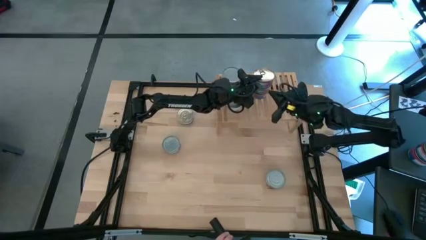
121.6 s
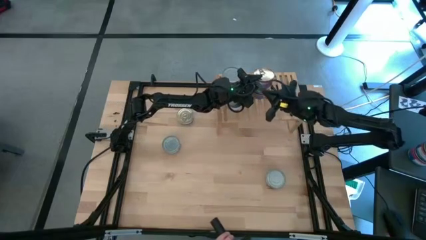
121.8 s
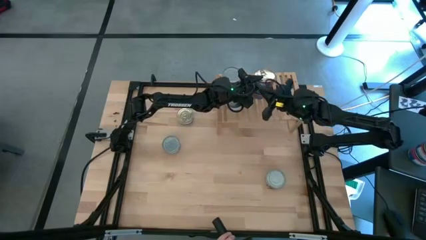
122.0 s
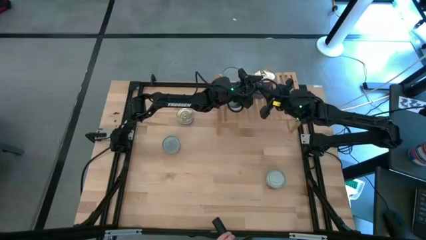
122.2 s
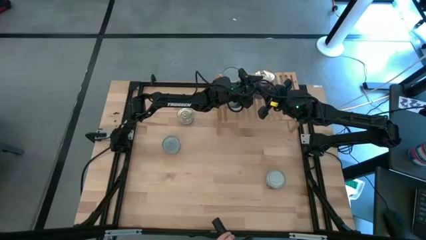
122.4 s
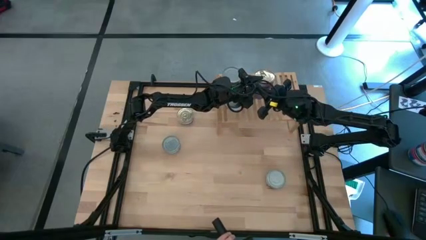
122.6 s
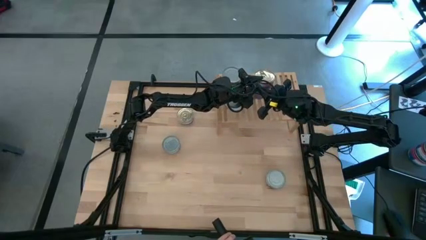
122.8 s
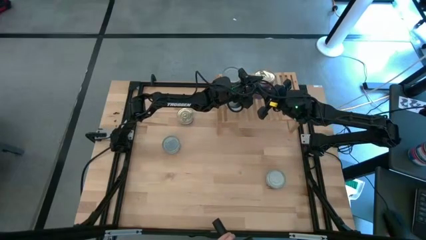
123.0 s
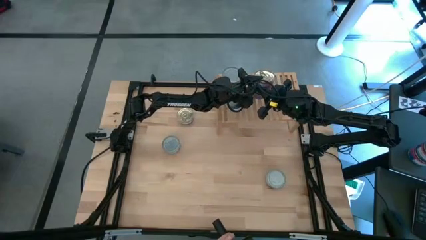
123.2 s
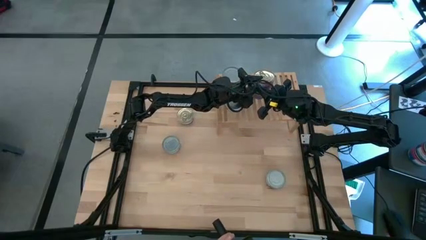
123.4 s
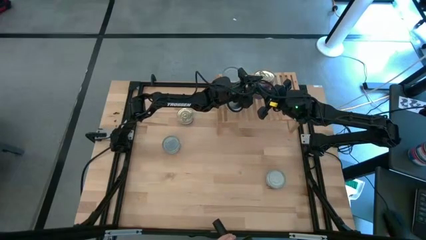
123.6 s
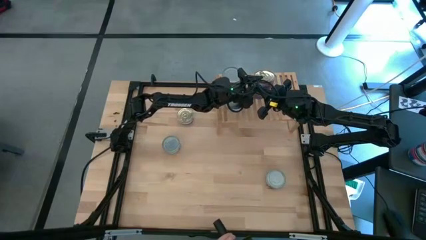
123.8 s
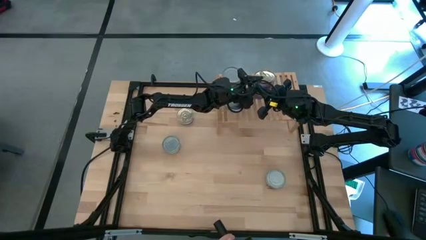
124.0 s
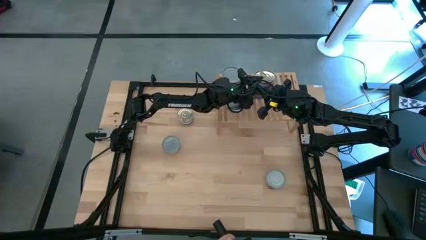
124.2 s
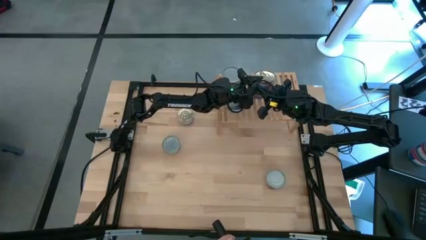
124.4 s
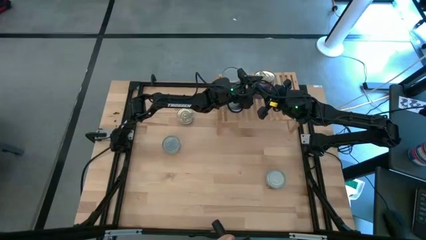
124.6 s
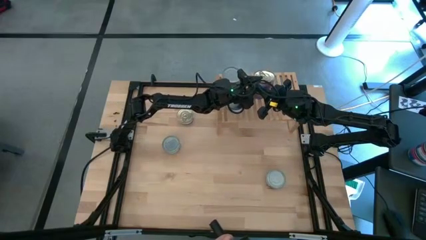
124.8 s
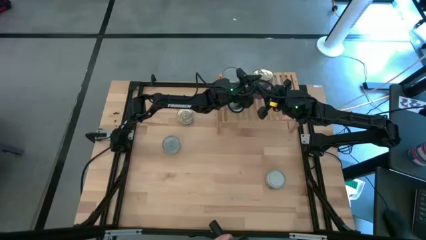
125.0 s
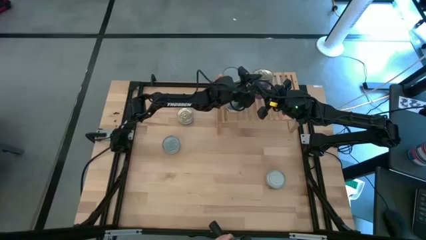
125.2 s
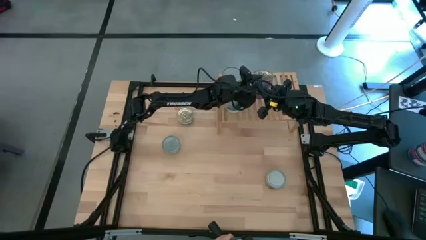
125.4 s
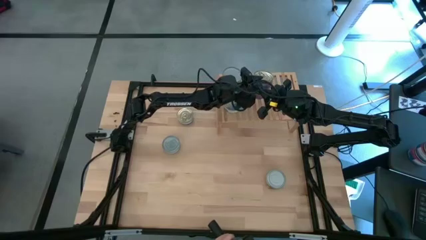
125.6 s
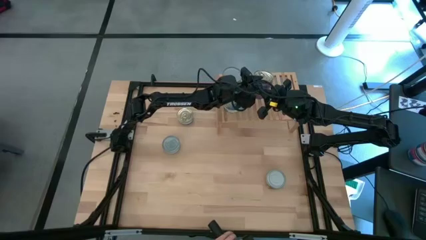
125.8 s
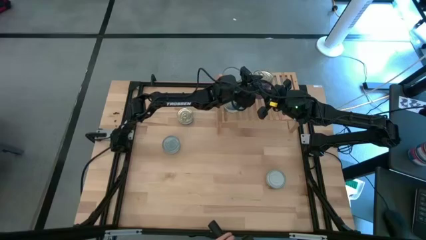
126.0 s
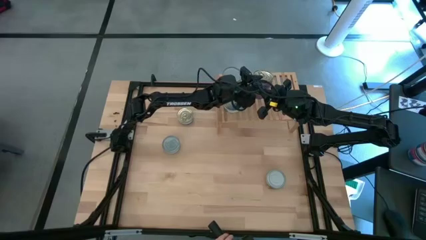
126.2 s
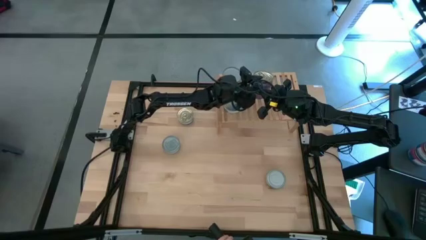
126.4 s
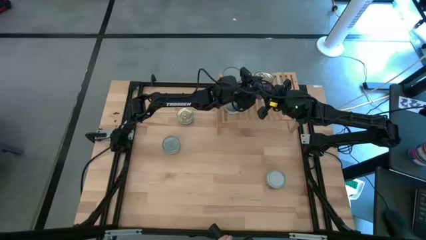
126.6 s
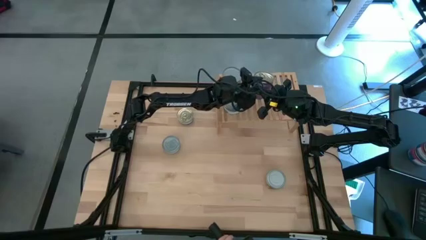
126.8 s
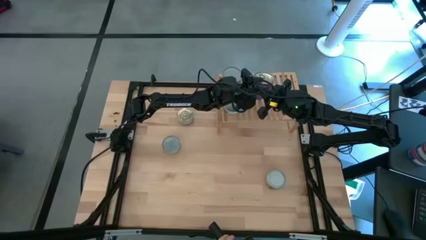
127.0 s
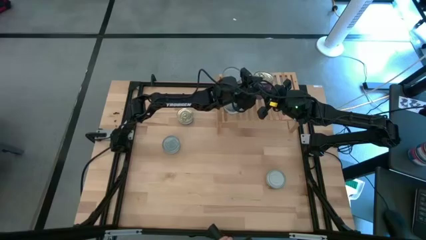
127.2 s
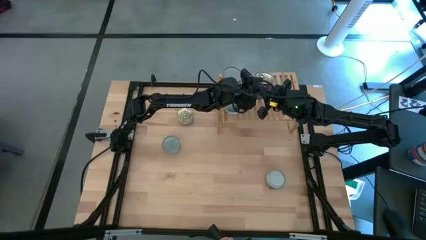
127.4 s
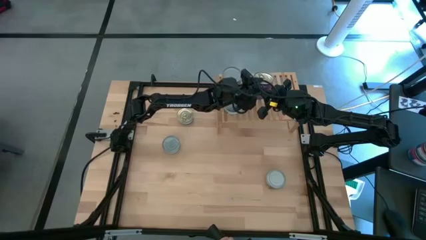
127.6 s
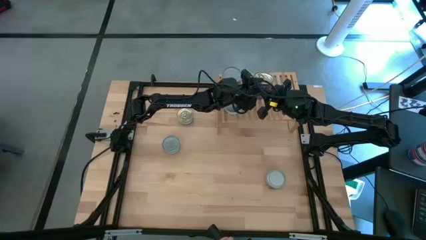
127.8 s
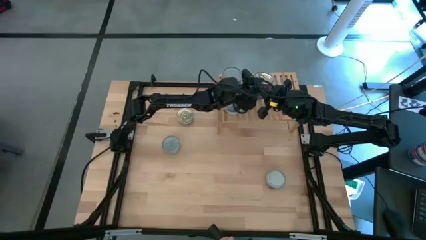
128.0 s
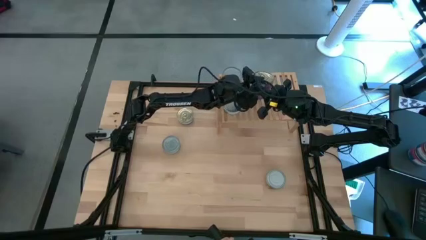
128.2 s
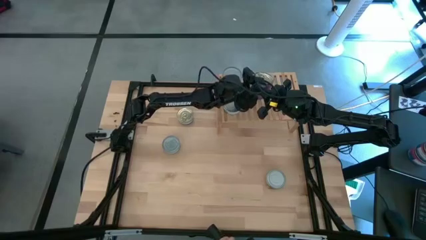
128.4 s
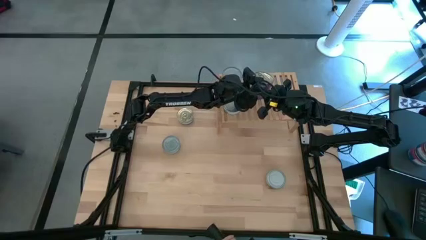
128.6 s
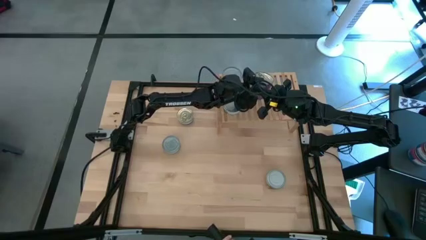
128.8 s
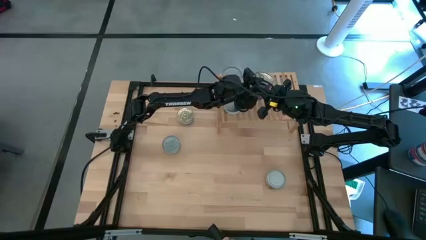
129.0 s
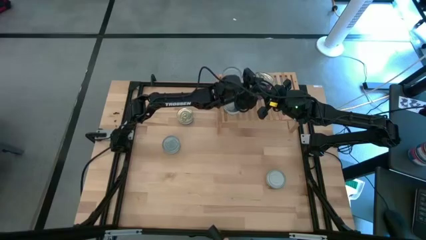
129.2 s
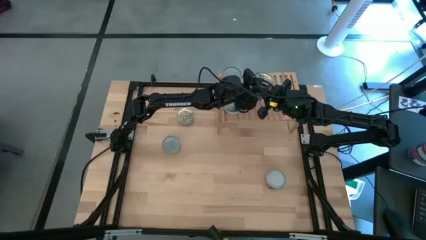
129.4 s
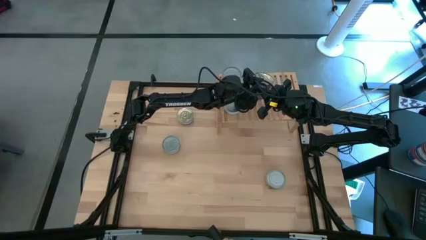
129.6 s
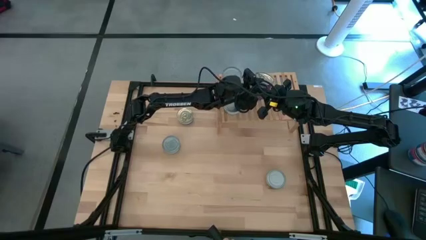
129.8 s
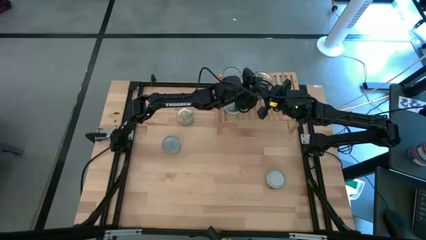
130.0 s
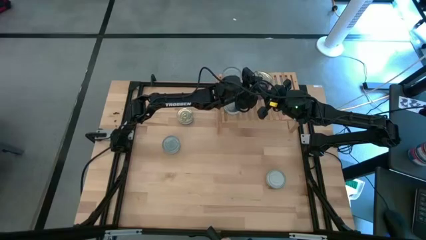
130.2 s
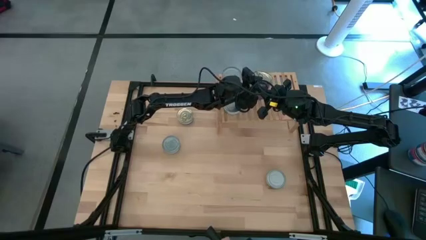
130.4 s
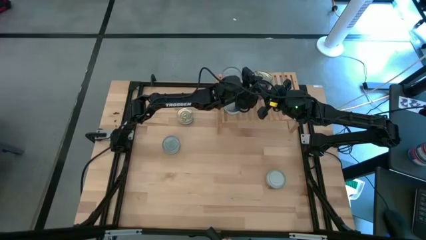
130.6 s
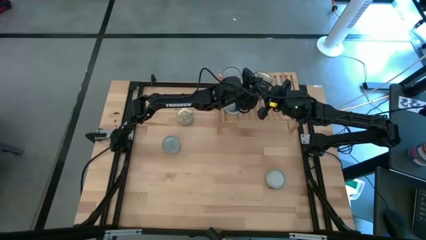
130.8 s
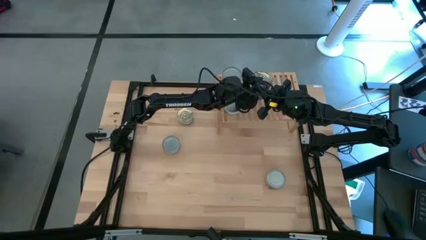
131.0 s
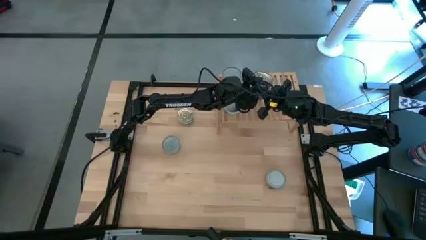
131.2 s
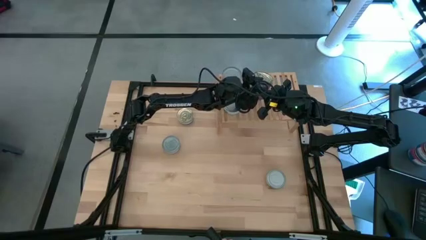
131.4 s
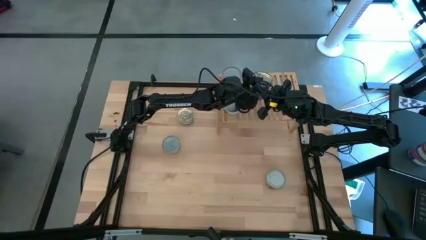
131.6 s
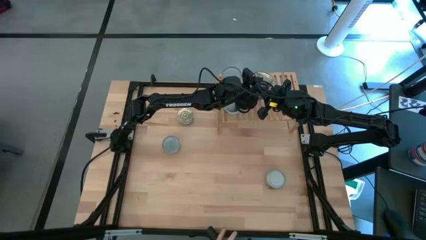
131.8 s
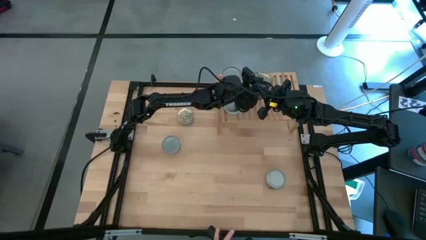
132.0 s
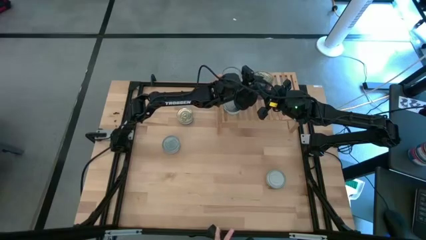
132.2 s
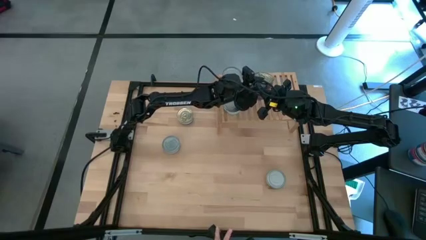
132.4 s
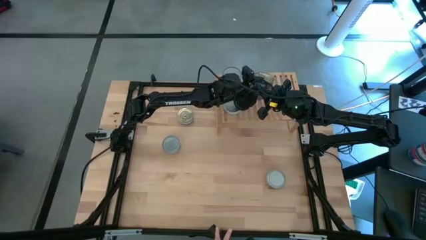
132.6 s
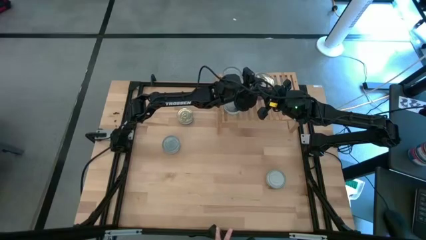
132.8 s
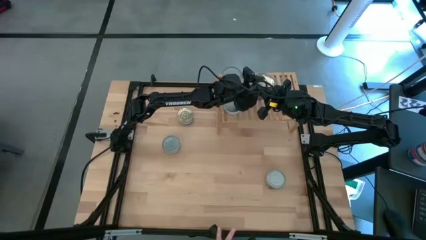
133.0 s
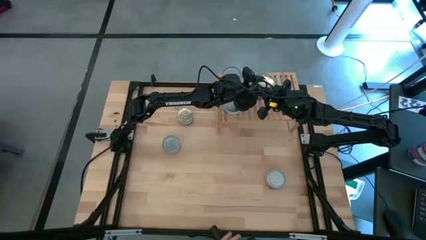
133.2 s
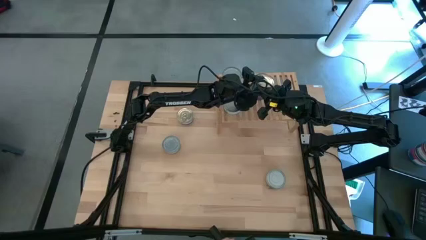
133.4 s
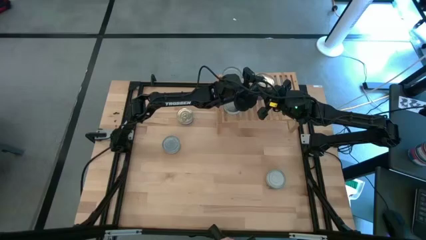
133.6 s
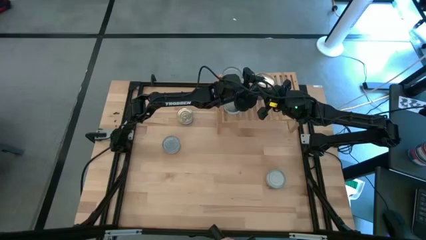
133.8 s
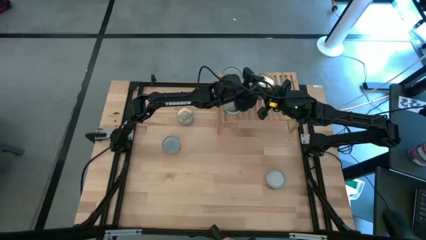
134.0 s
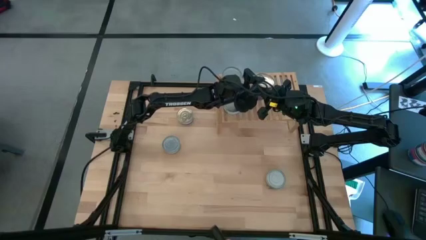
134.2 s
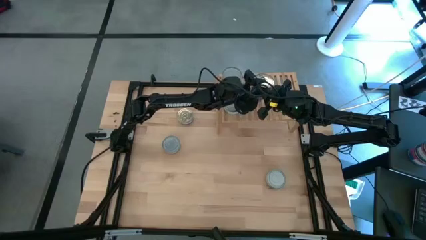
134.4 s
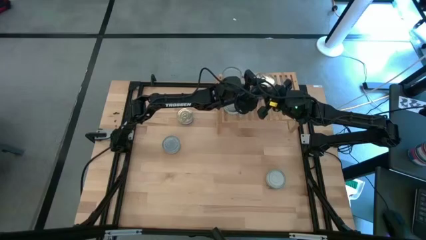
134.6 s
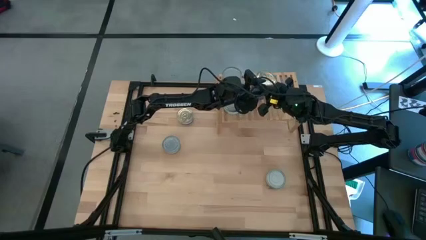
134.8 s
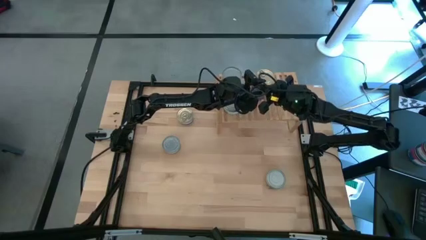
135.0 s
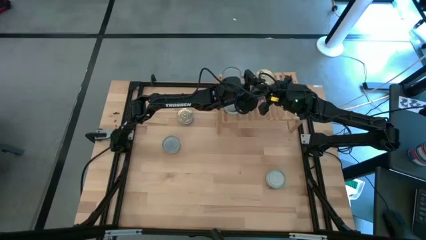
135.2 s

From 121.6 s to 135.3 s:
Task: Stack canned seafood by type on shelf
Stack the blue pink tuna can on top of the blue pink tuna cans on the shelf
